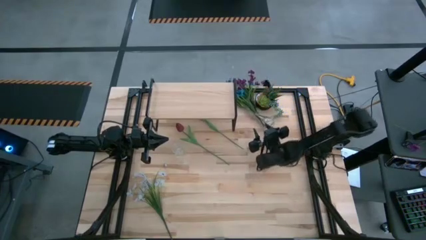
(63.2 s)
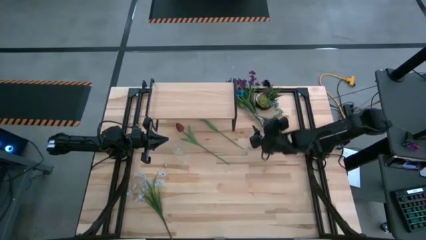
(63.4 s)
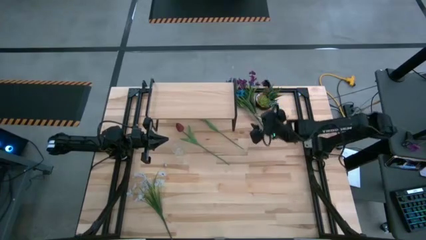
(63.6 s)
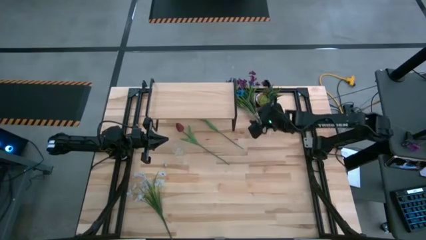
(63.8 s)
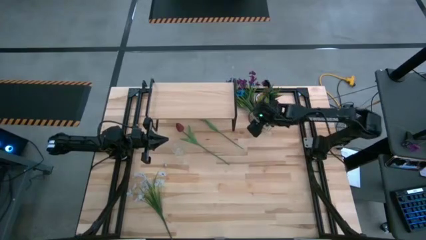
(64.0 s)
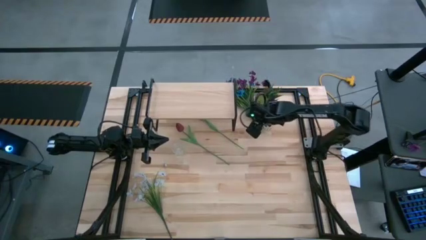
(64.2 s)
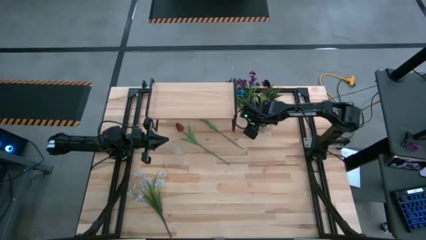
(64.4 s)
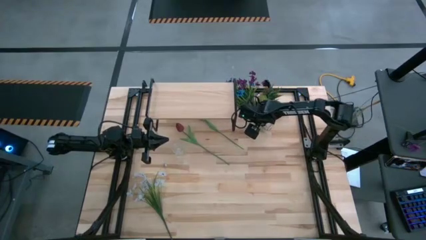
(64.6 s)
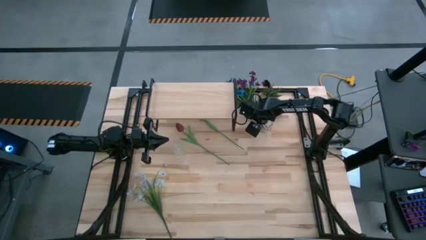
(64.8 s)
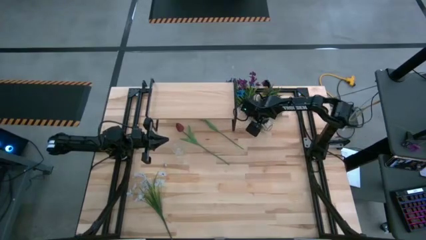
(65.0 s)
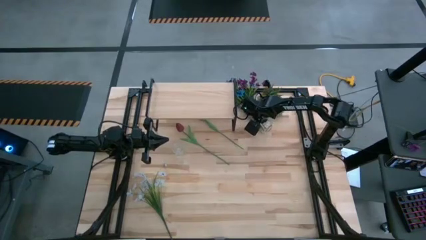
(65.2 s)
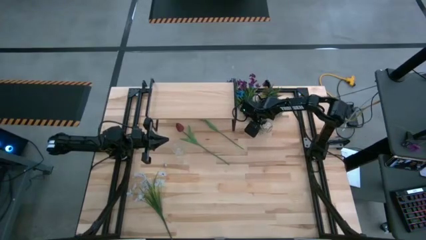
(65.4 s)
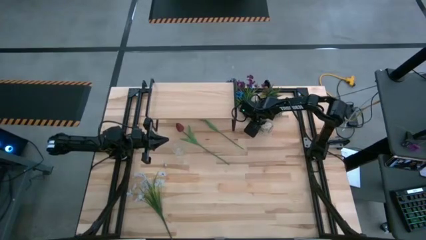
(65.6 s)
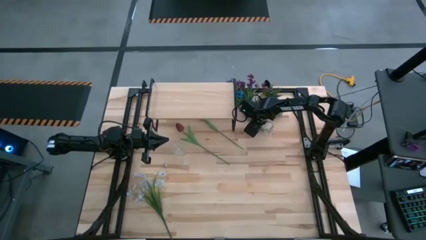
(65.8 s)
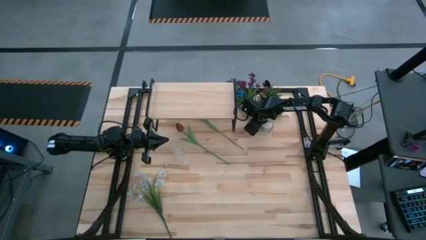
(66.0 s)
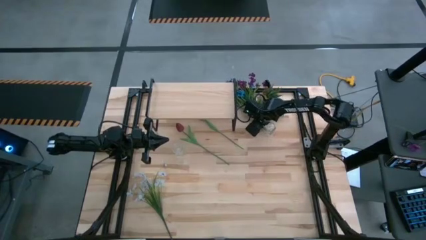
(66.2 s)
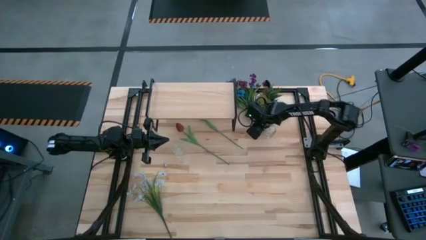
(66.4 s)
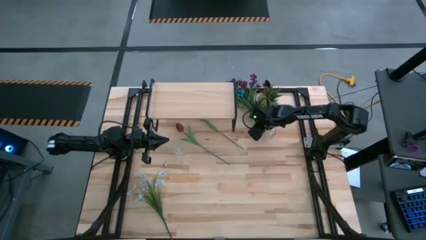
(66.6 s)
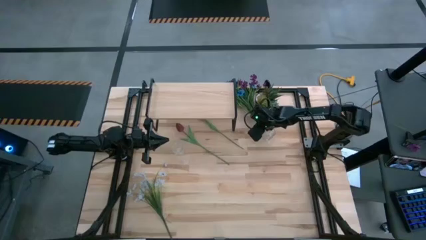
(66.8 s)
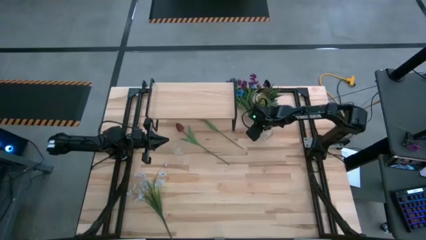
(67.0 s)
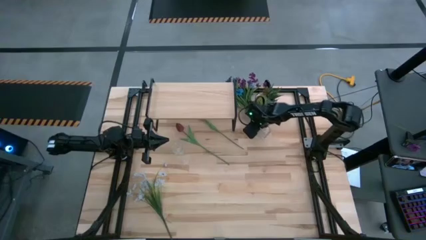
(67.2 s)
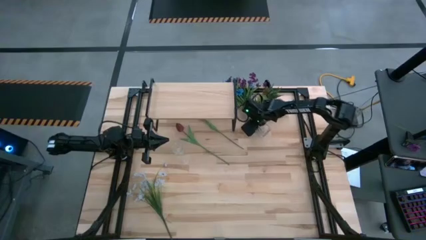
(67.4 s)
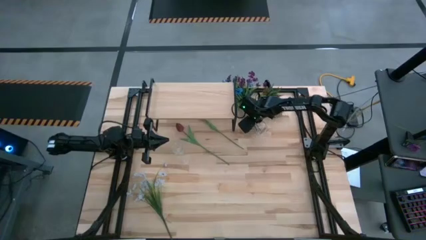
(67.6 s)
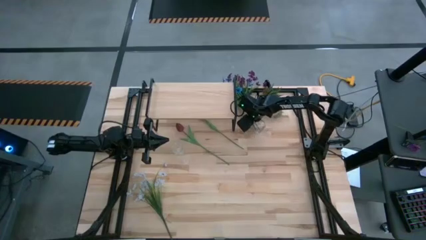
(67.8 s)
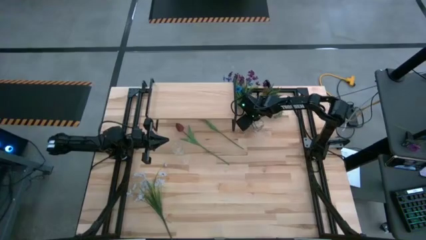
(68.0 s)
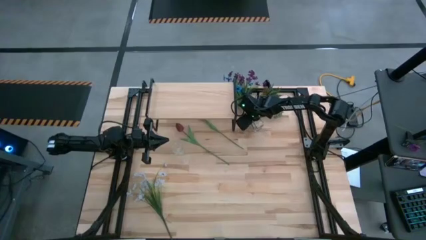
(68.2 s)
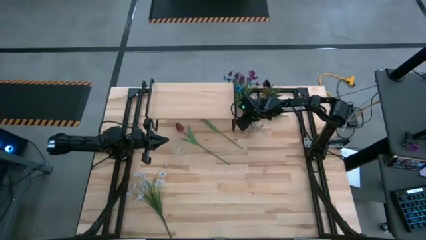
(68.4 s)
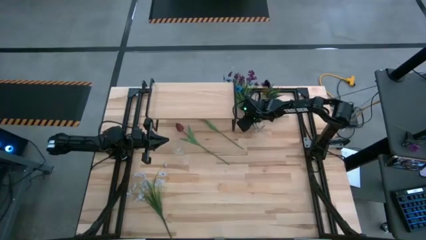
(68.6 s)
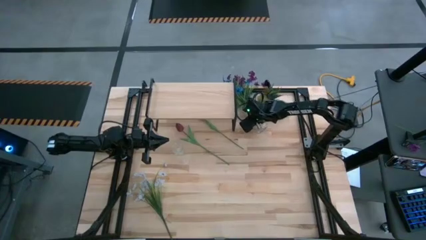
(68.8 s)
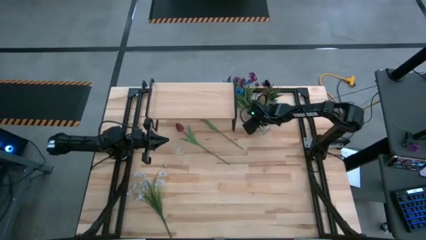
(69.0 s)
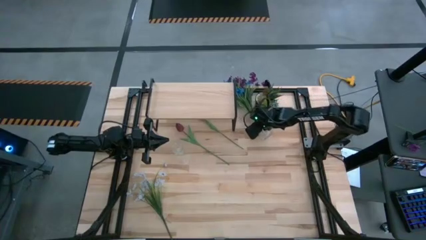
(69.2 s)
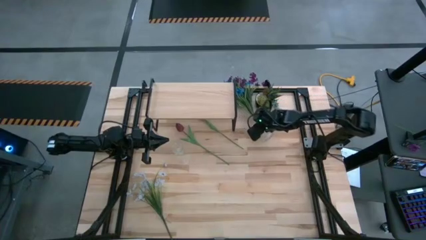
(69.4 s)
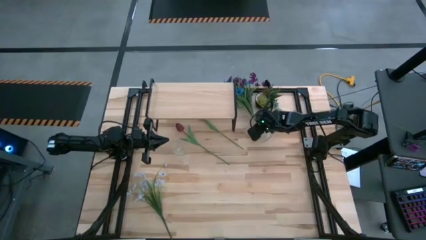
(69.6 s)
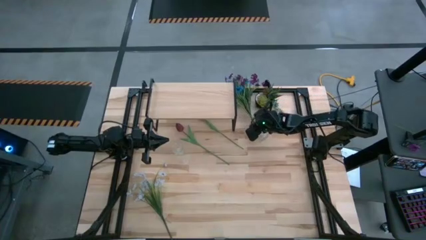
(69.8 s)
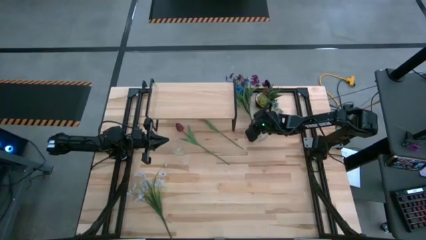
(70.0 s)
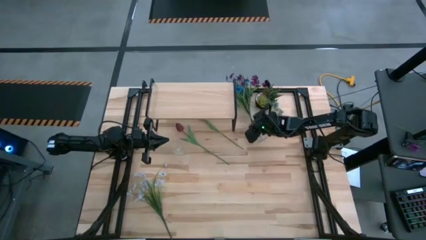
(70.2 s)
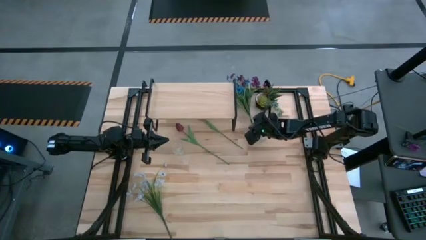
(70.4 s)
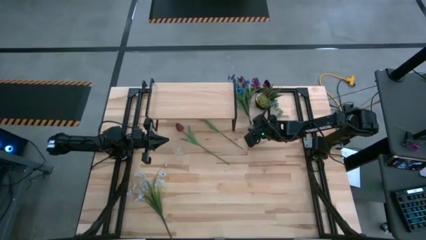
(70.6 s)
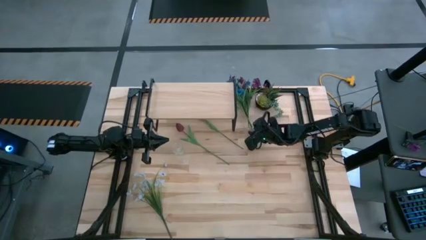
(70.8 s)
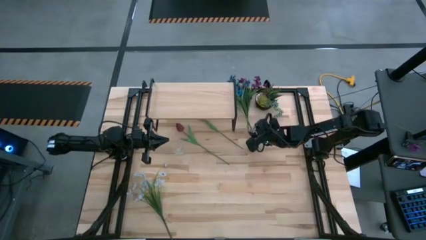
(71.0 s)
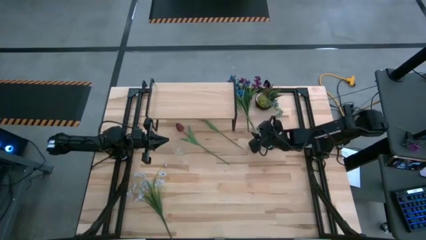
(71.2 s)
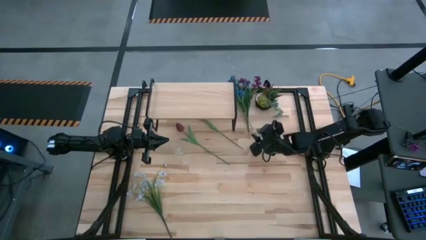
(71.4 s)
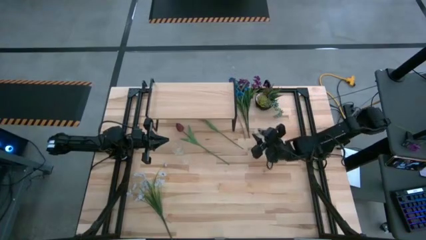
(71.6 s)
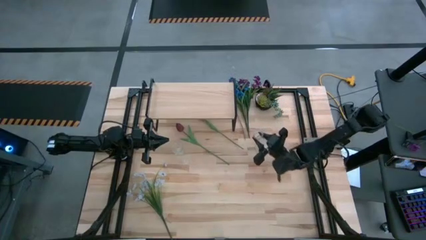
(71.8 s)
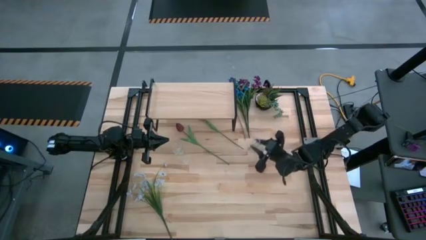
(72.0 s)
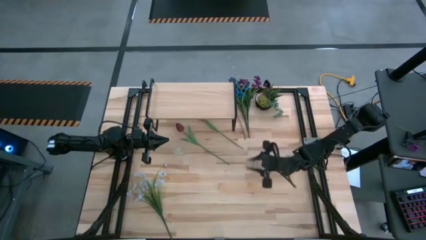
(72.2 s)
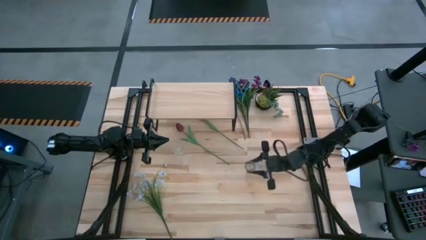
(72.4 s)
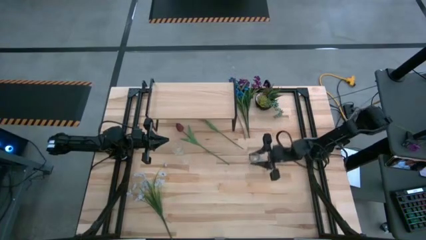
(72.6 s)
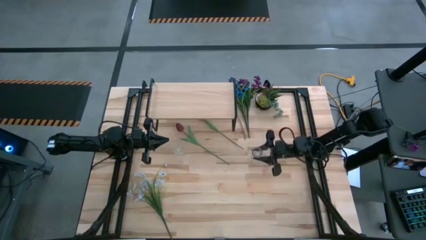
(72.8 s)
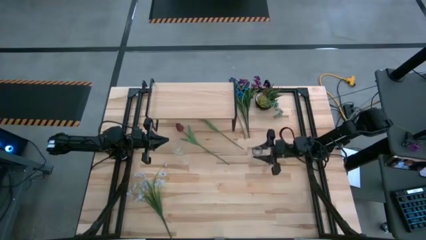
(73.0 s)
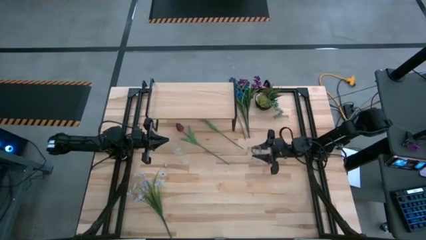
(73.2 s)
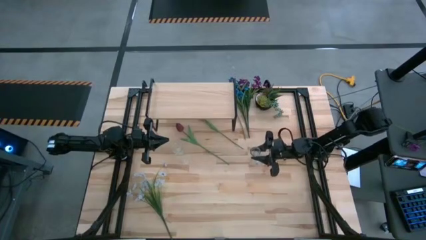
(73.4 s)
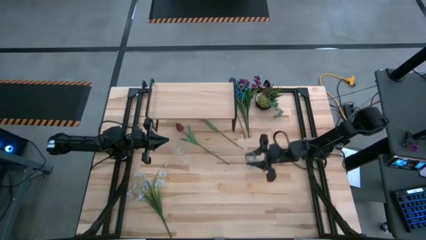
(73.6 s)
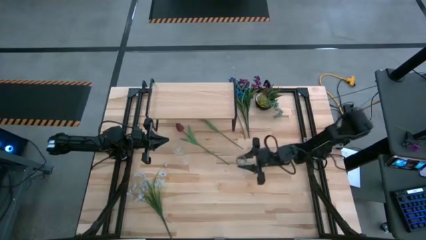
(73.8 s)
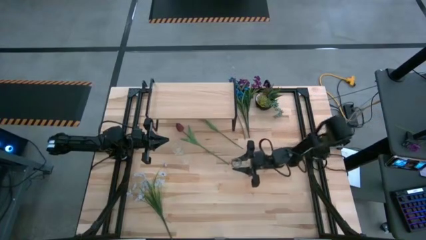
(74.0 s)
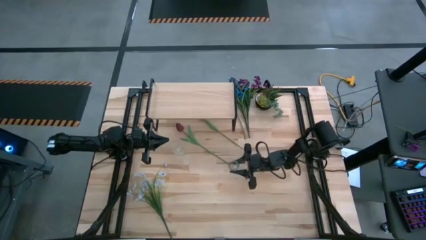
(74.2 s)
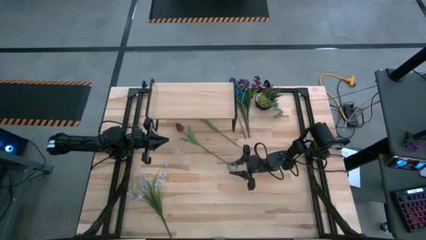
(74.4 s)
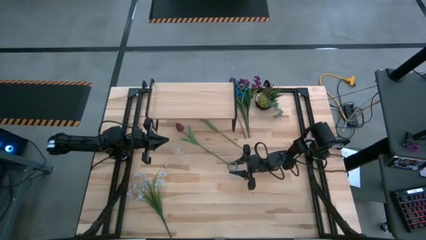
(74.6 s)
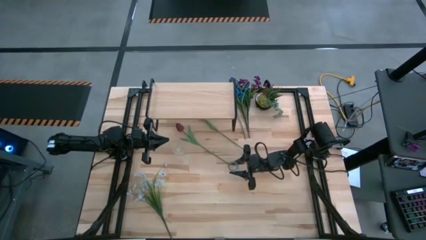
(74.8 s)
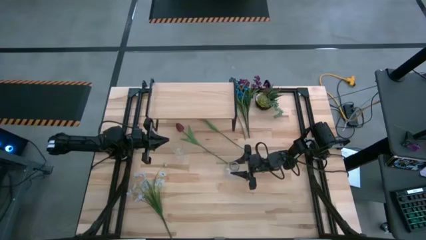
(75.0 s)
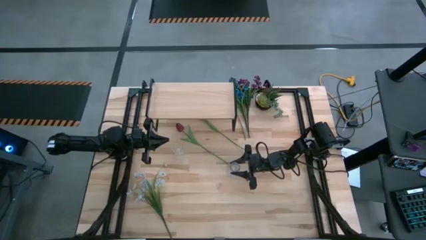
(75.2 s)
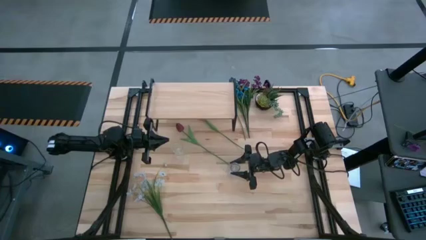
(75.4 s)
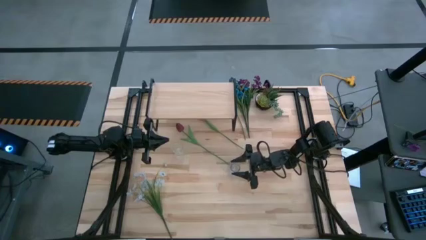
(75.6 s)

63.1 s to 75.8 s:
Task: Pick and place flowers into a vace then onto a shelf
Adjust the right transparent vase

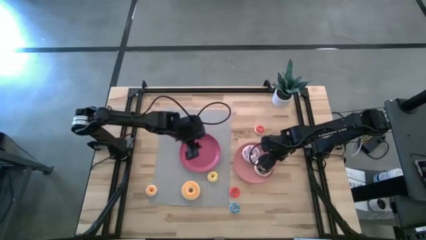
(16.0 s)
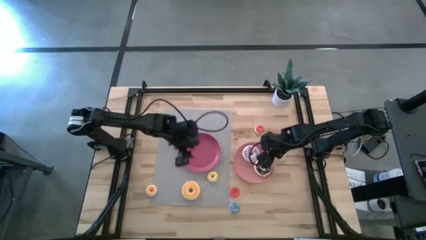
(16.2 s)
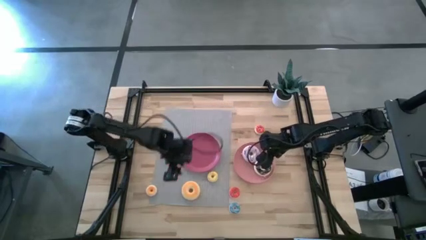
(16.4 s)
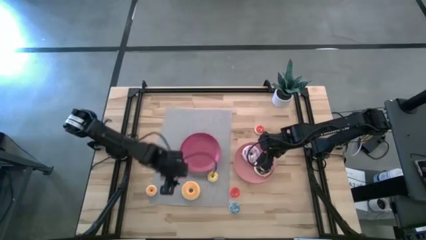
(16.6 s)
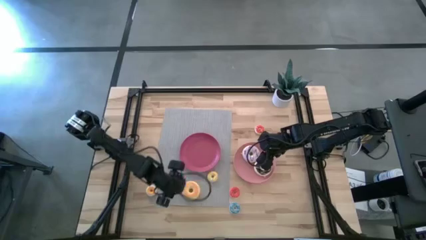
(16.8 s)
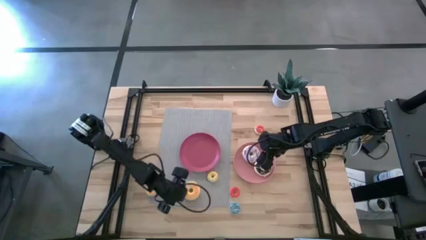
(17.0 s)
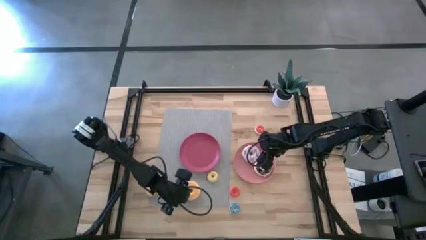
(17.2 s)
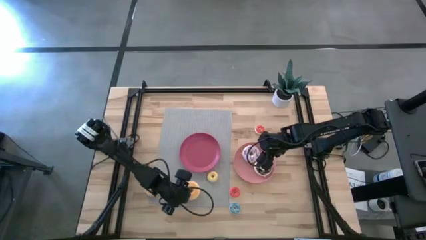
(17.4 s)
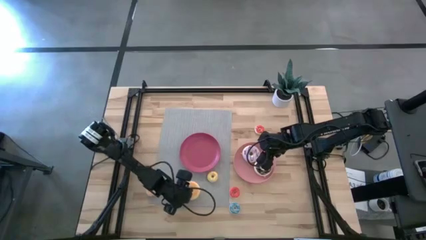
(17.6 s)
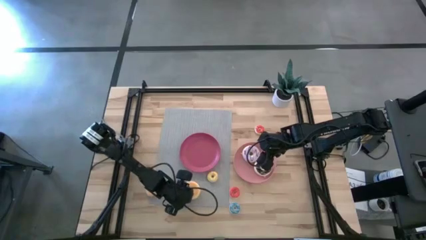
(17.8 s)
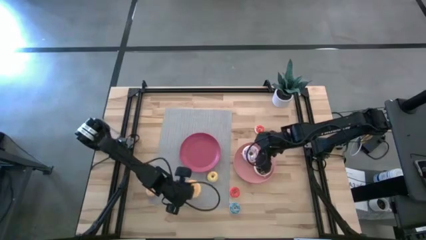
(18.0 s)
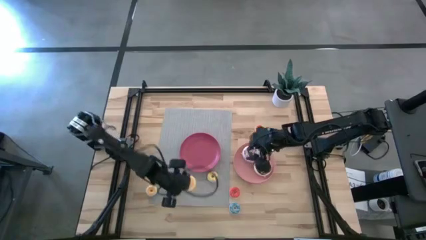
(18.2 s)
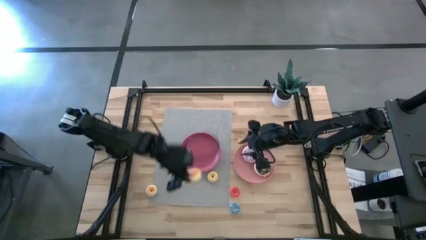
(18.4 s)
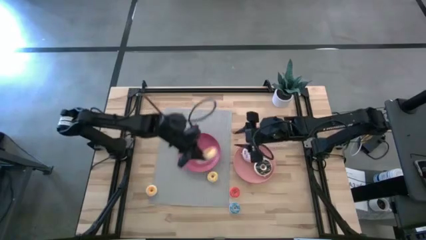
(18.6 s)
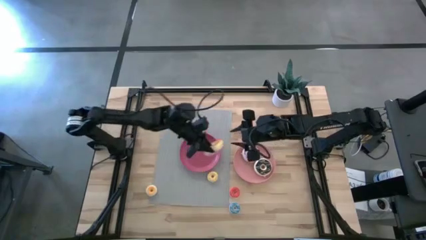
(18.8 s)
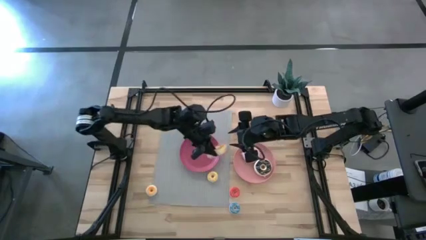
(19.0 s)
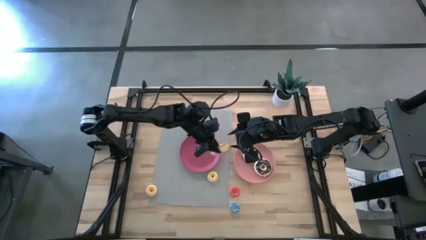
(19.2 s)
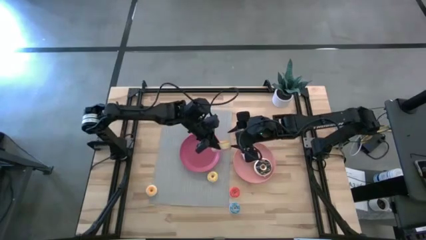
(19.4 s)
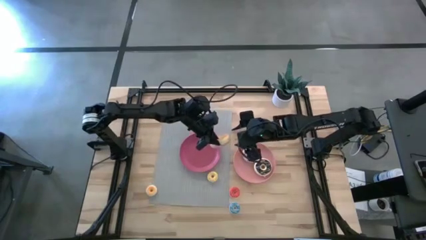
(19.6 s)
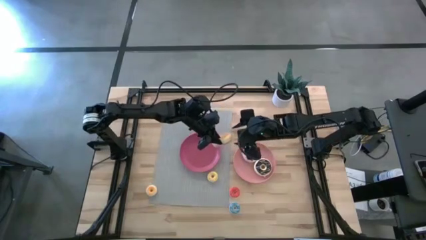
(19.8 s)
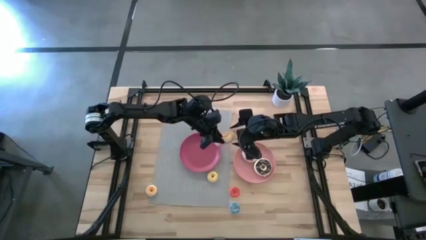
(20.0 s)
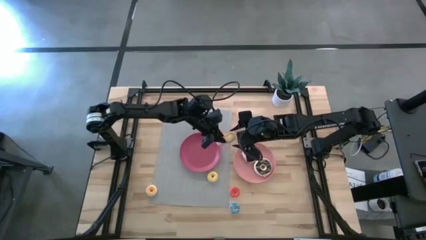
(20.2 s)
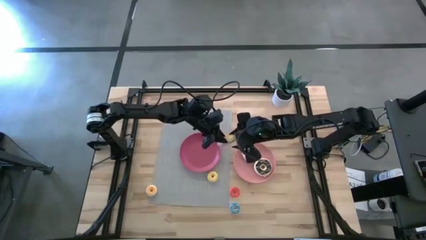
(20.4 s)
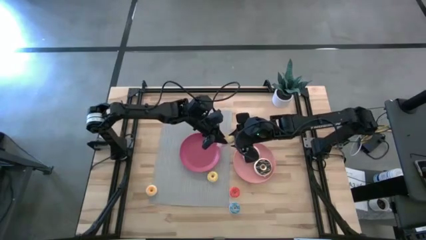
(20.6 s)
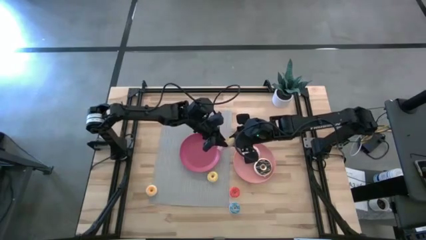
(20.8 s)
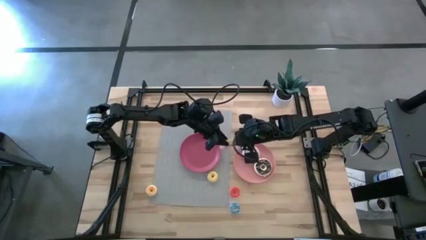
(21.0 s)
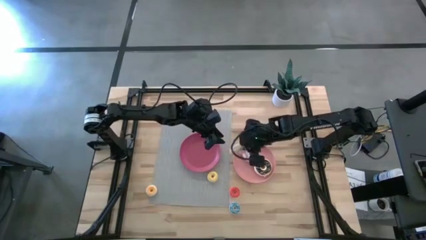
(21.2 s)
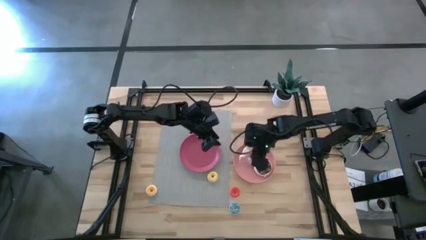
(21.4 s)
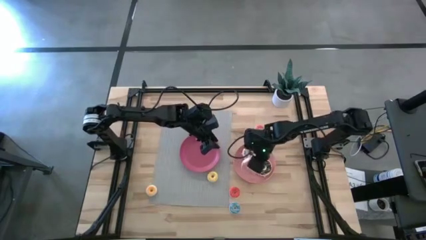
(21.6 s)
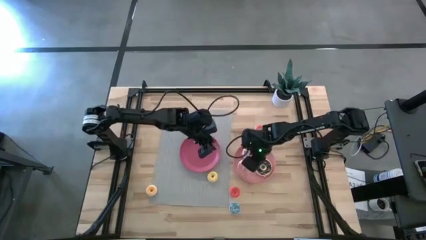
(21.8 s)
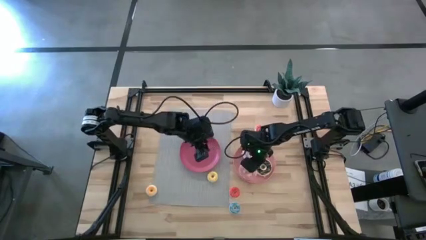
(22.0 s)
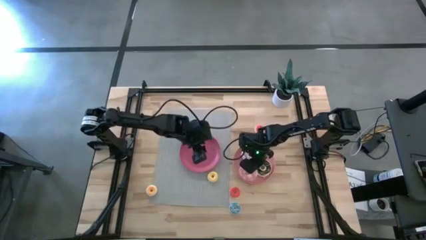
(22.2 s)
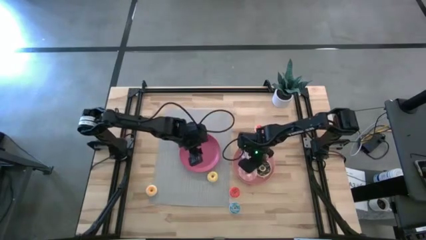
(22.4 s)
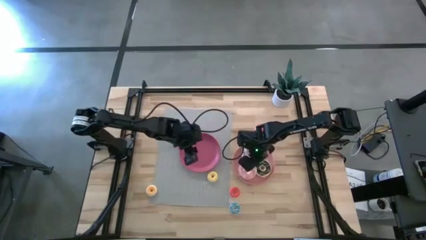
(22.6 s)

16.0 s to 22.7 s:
Task: Pick & Place donuts
Put the large pink donut into the light pink plate
